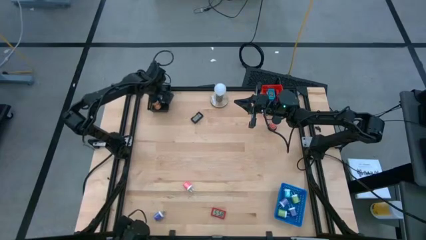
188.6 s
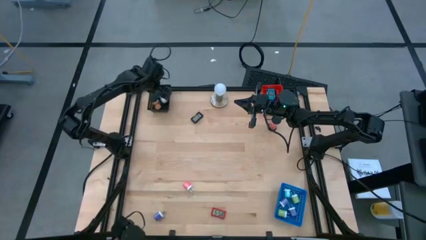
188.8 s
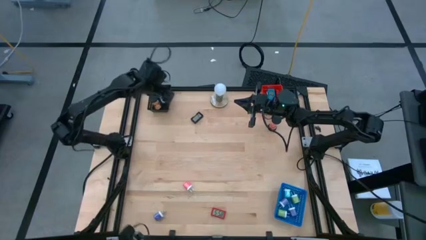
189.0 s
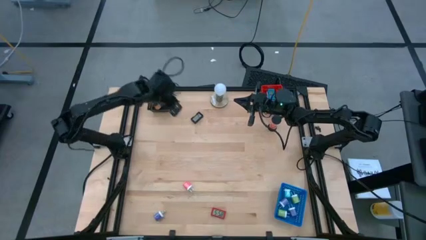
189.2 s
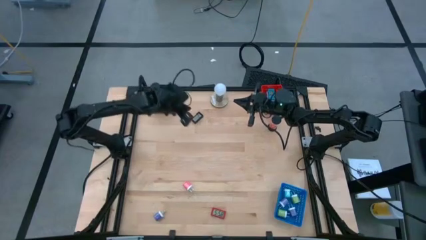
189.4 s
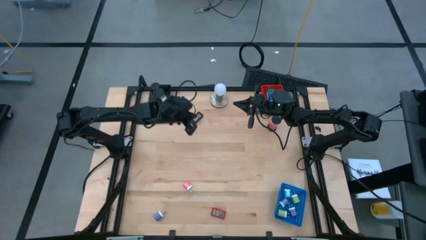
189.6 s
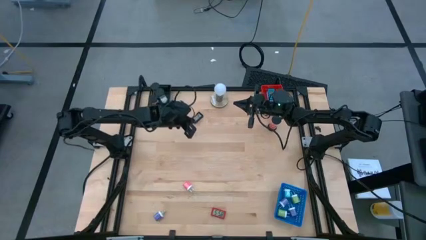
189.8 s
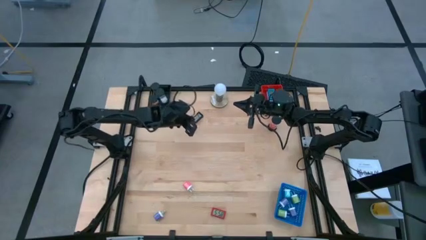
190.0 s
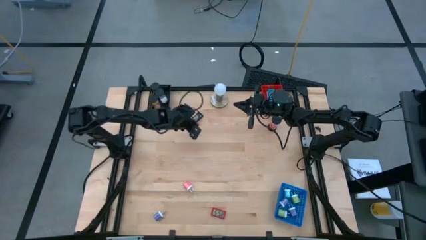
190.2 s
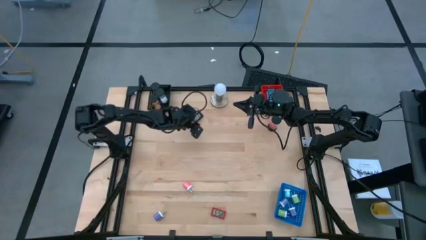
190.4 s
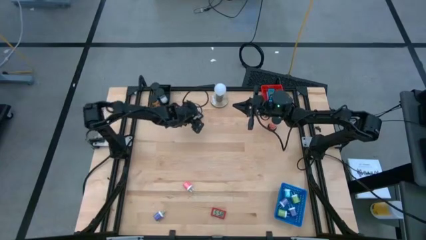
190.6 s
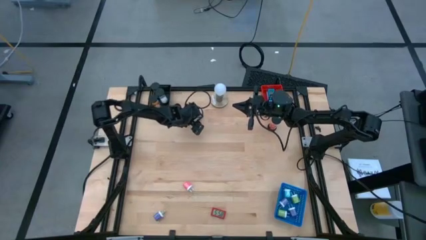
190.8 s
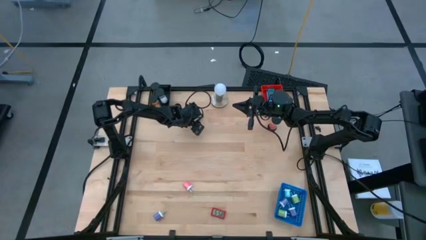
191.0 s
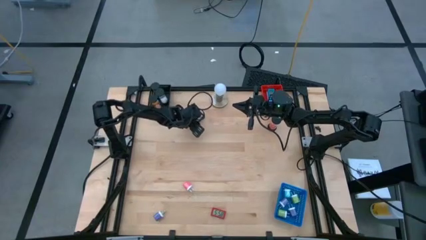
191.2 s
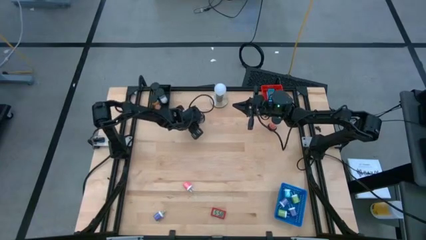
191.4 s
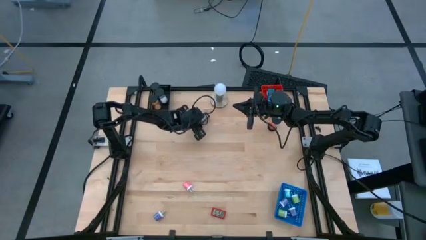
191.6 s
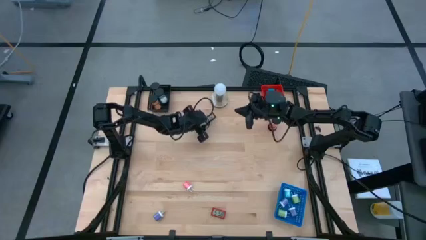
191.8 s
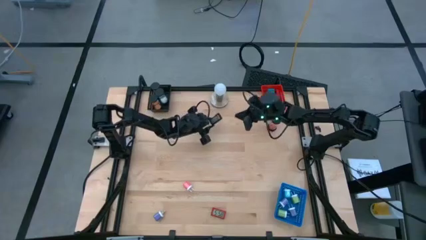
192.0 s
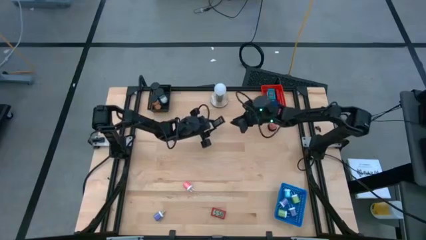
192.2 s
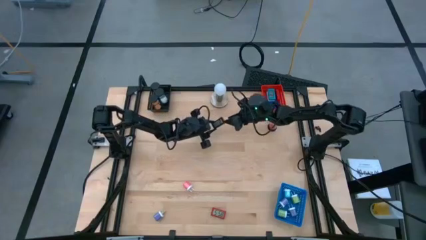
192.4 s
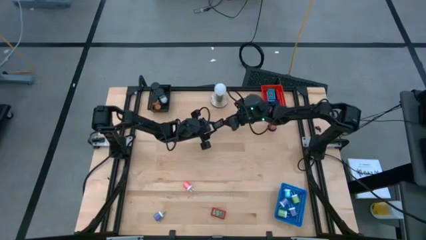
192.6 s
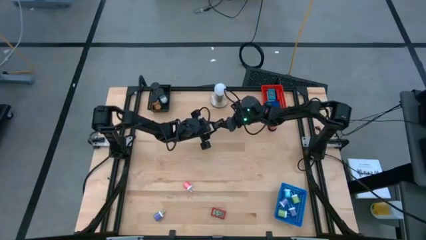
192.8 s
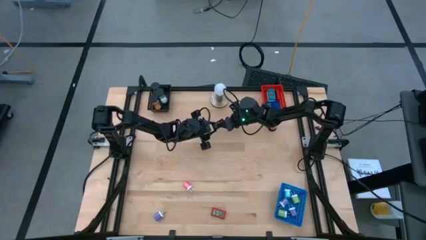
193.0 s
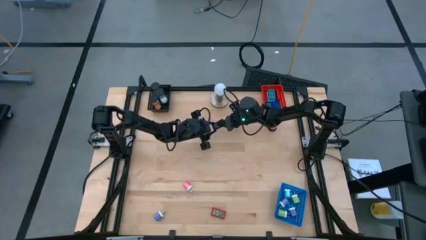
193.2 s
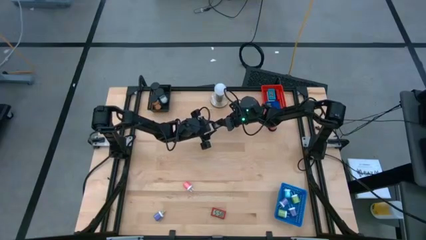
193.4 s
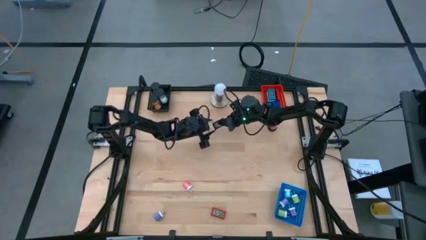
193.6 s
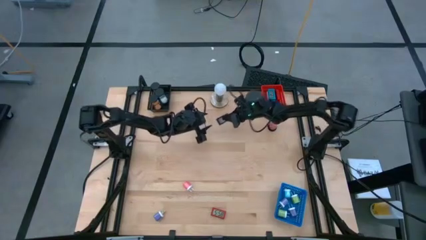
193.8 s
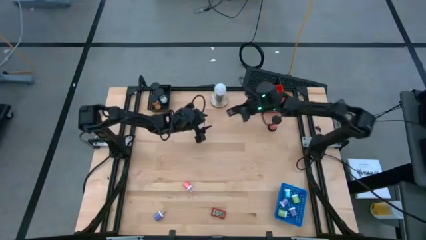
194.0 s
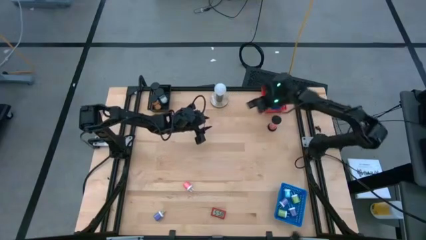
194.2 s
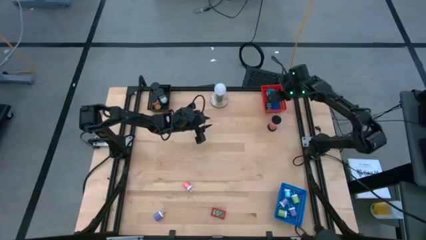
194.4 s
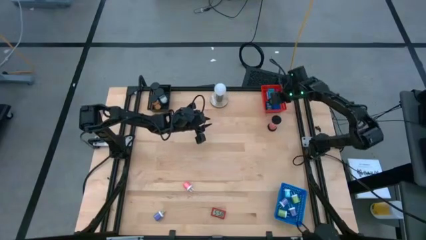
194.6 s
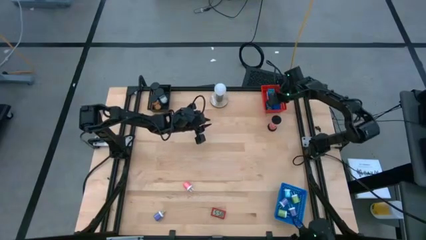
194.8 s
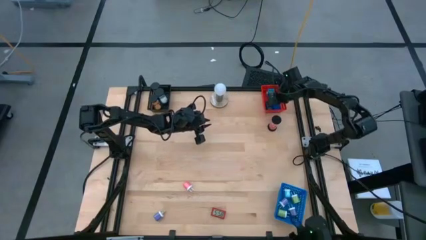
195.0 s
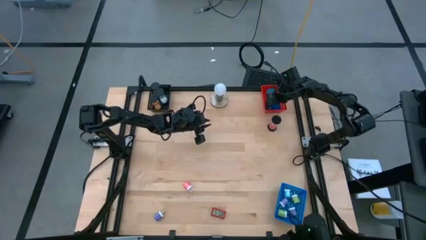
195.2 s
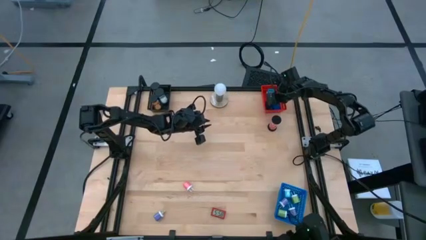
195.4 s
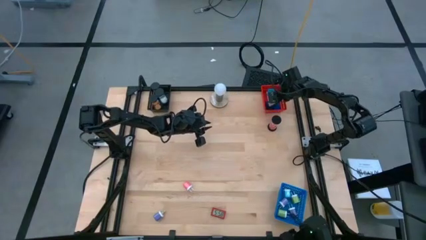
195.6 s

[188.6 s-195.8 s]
Task: Pick & Place Office items
Put the black digital clock into the red bin

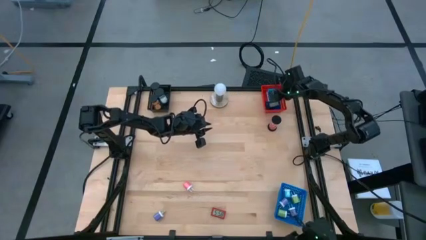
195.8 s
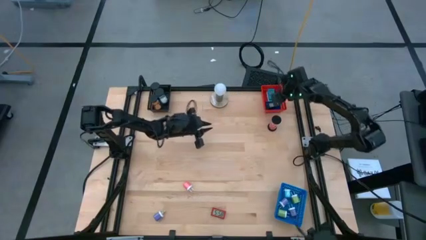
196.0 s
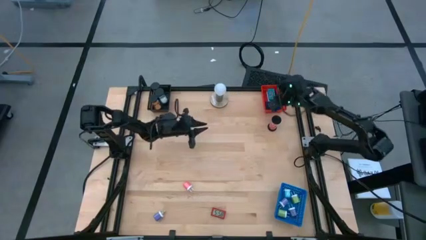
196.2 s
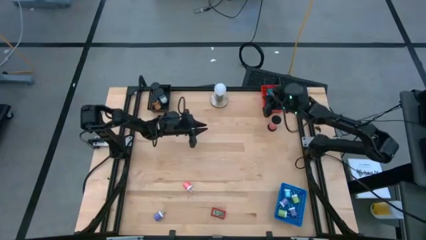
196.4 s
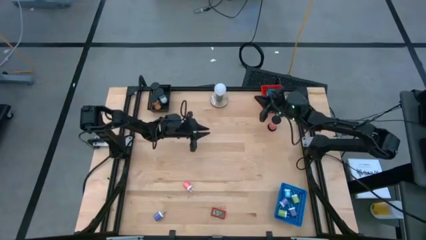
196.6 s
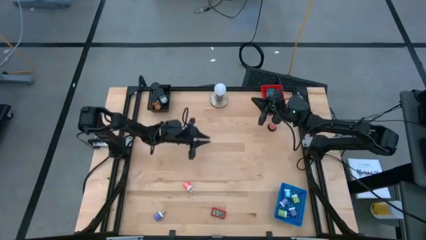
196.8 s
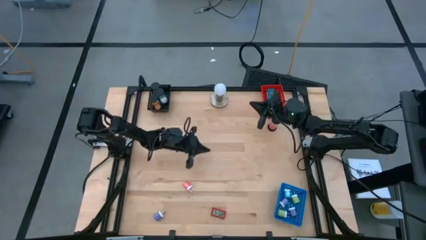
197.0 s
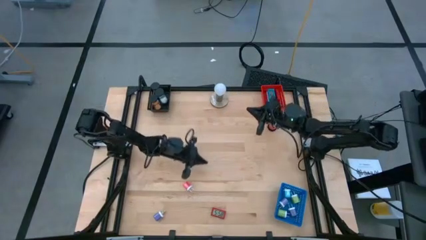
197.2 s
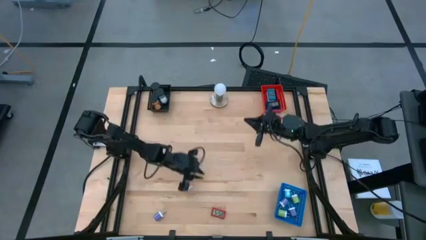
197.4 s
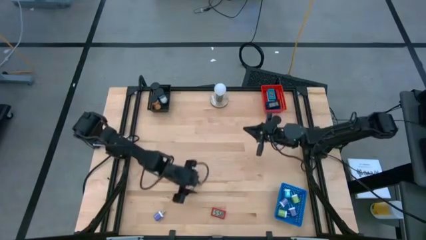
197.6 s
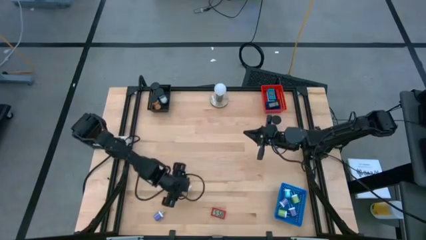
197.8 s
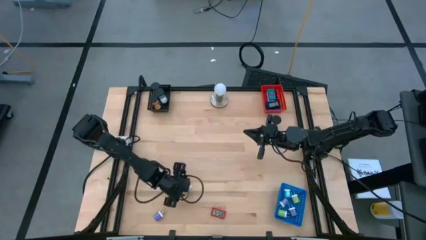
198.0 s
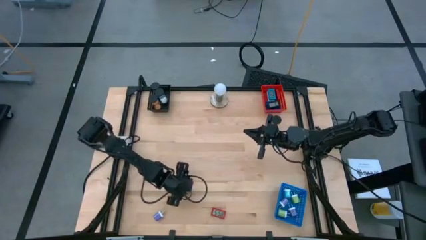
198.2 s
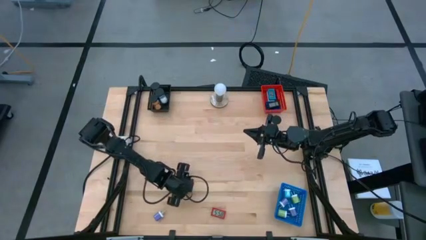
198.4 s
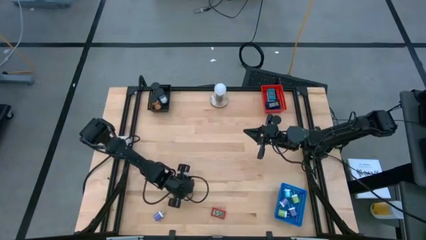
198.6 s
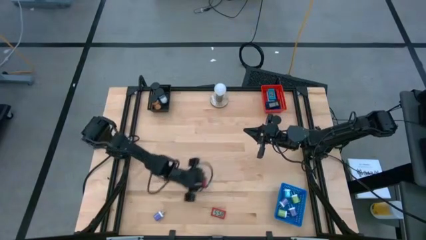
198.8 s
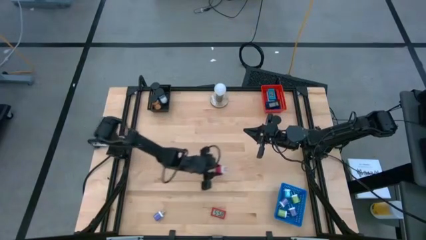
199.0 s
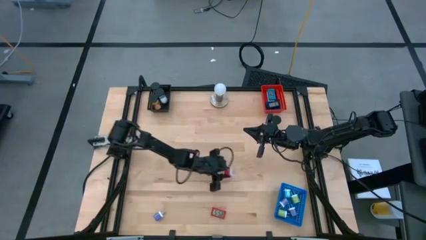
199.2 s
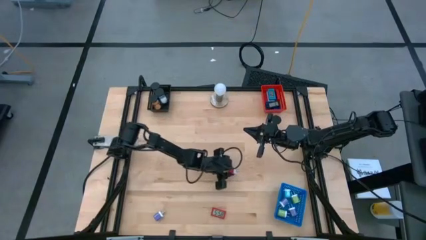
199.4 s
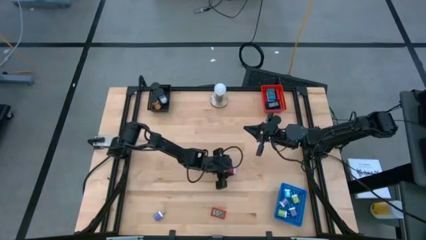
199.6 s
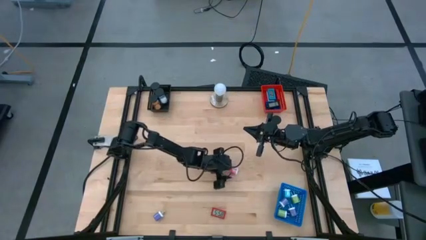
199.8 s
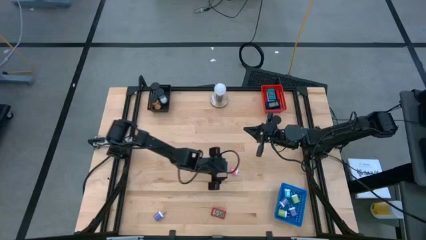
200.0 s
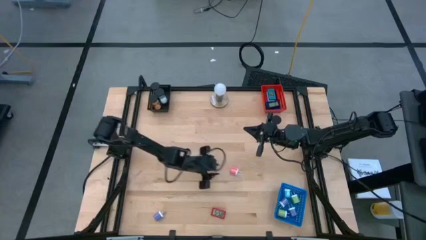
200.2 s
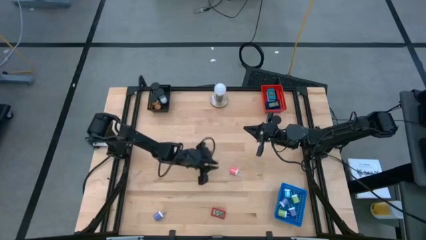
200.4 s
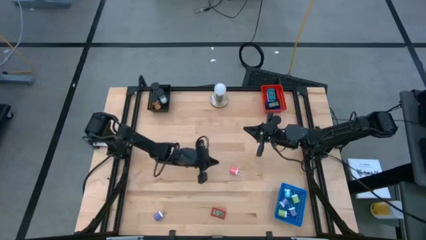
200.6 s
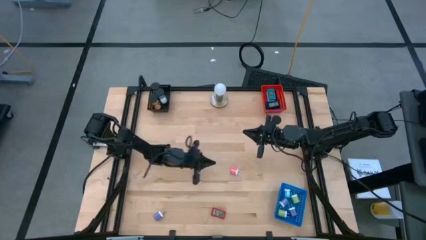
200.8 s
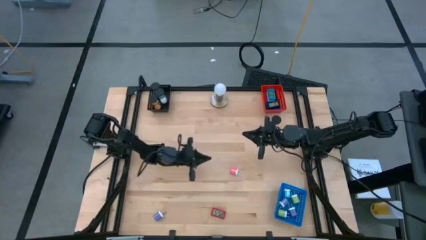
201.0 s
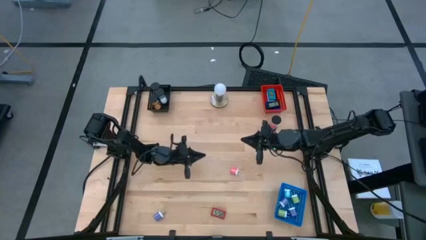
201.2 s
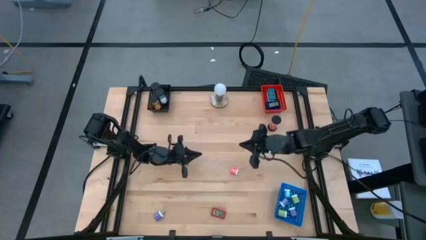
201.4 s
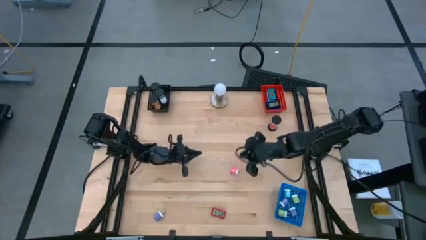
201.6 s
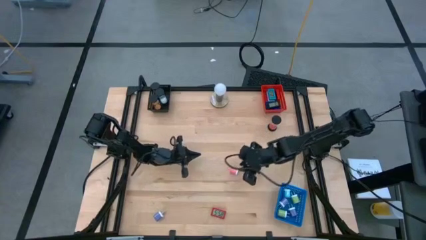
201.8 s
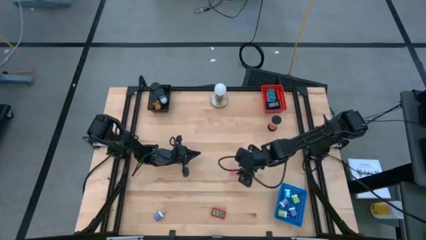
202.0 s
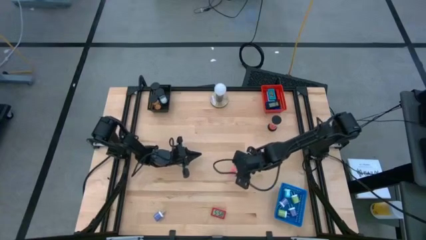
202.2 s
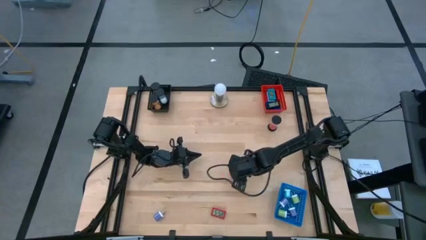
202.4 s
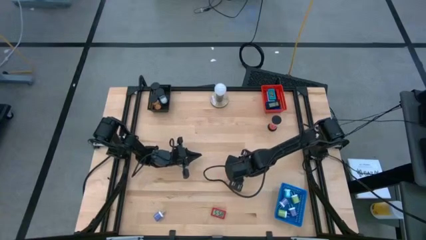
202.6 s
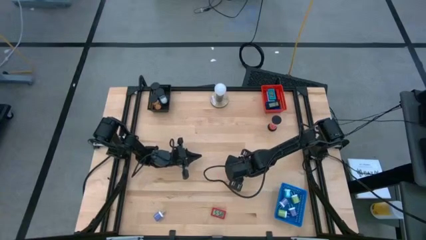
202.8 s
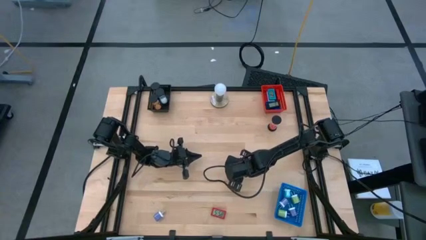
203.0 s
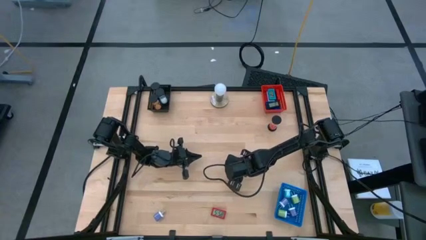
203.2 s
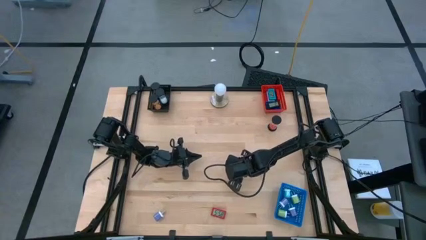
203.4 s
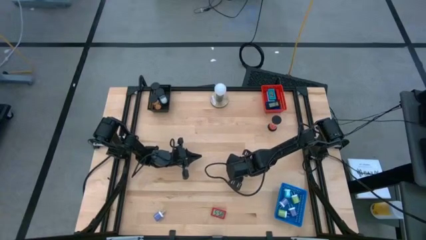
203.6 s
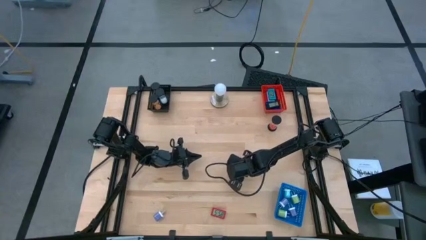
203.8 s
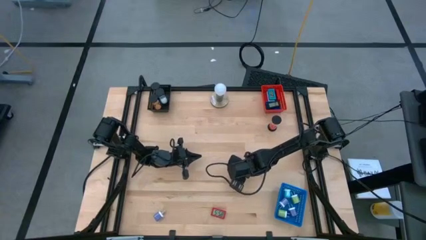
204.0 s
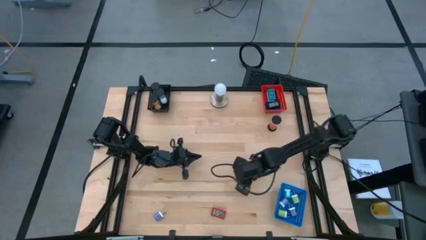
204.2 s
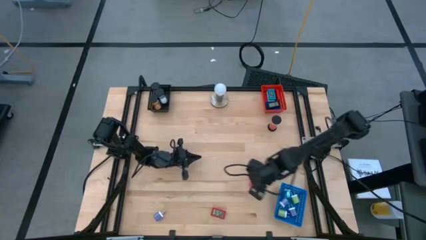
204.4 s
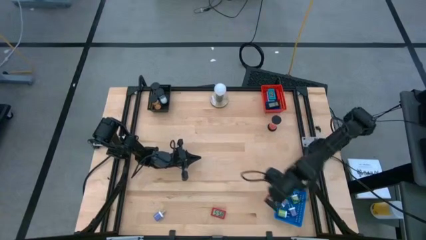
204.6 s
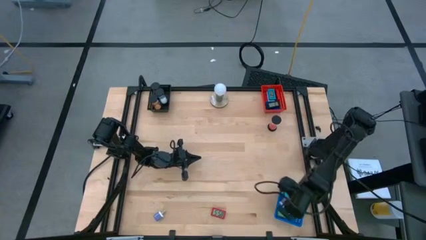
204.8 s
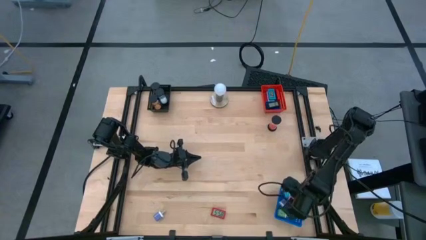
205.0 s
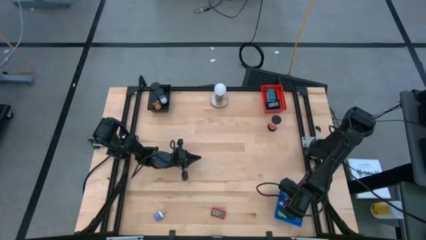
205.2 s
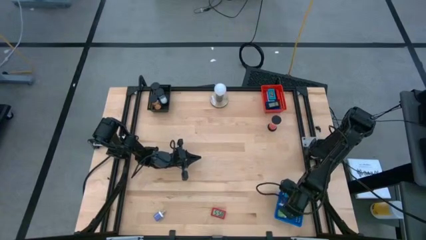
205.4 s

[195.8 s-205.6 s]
Put the pink charger adapter into the blue bin
